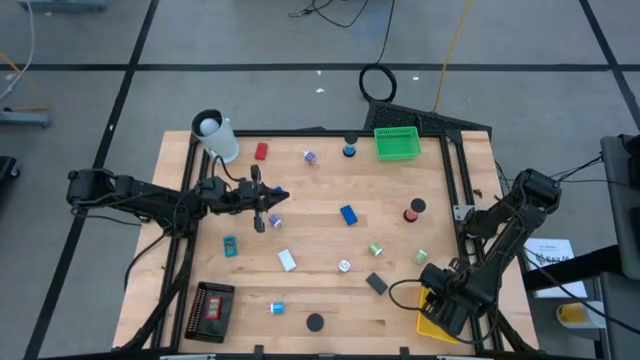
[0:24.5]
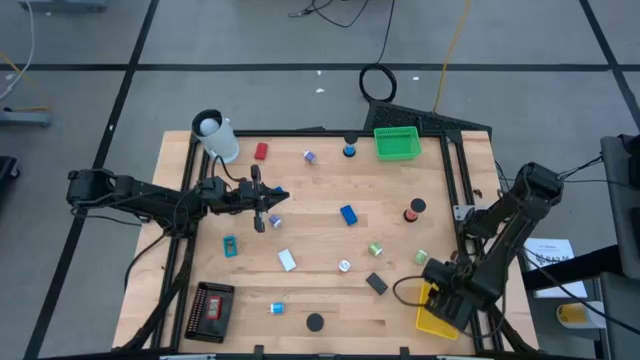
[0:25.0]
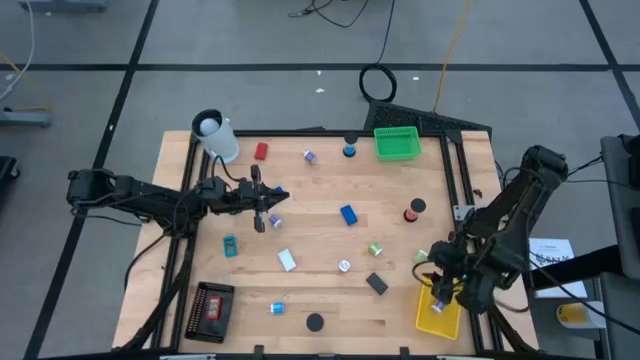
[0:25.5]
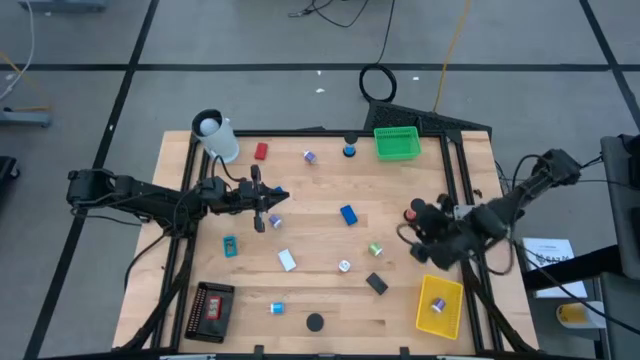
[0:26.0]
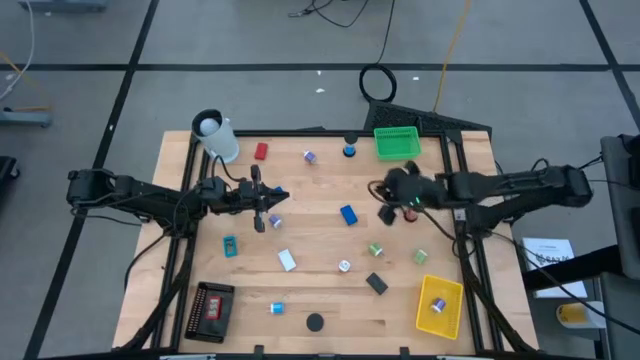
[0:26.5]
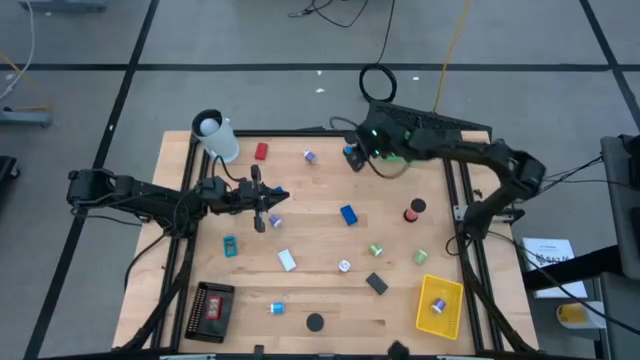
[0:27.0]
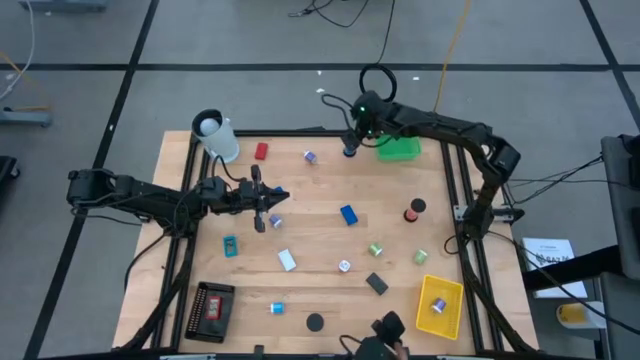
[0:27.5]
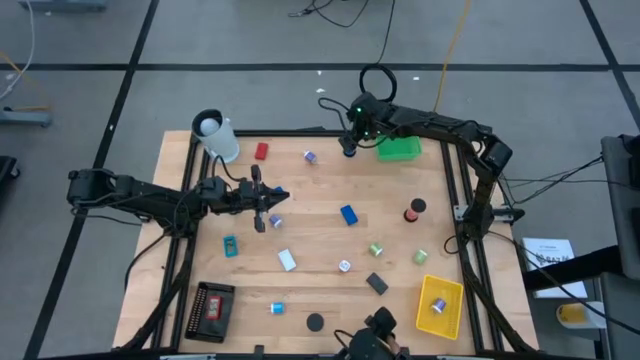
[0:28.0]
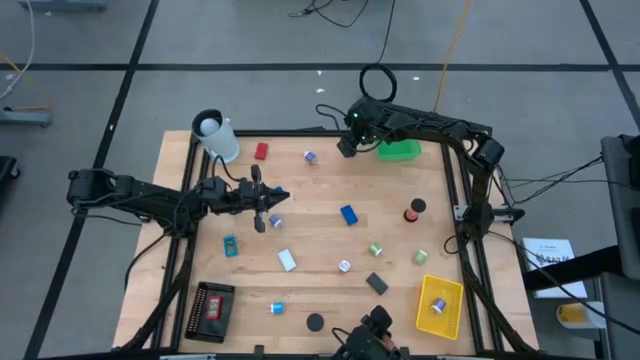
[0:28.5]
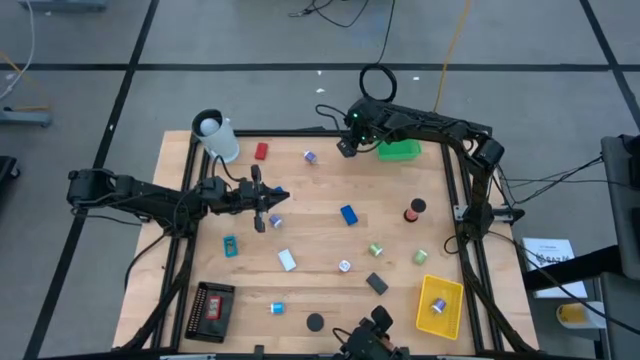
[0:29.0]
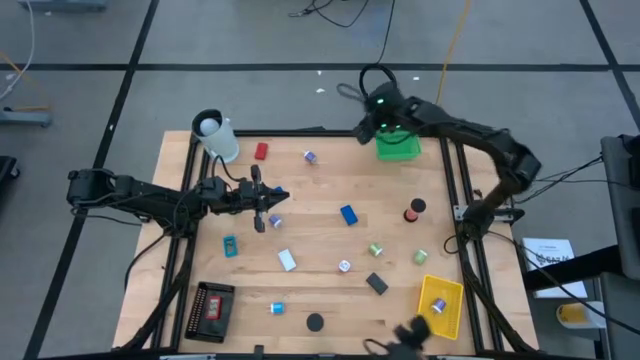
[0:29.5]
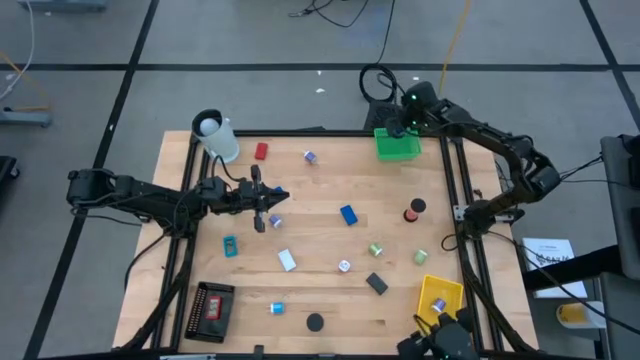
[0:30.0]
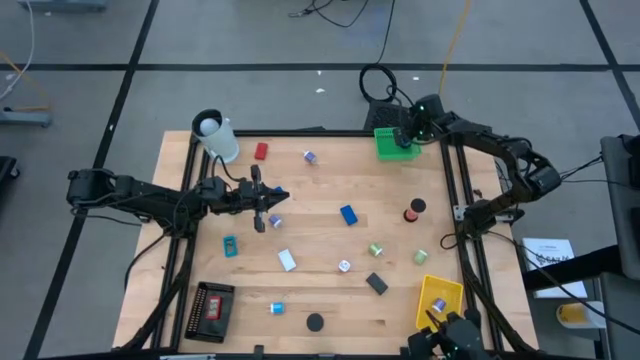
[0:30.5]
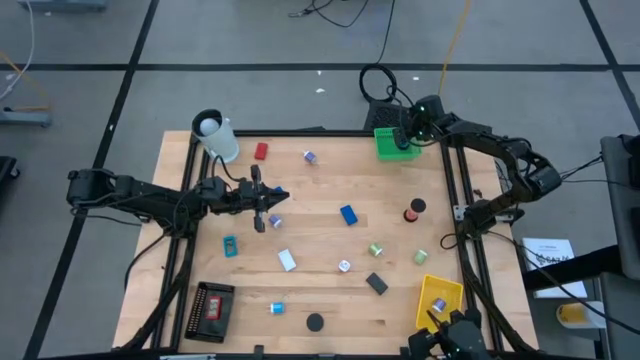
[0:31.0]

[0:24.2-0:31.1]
Task: Pick & Place Office items
Put the blue hourglass into the green bin

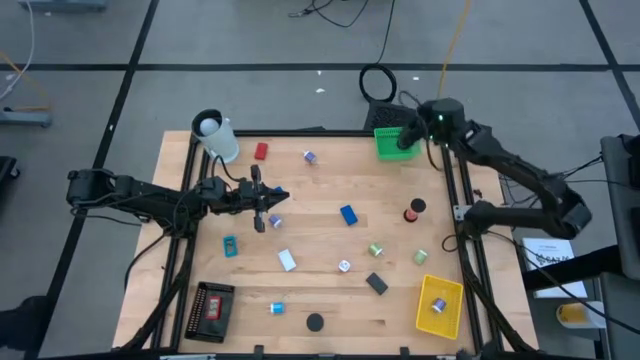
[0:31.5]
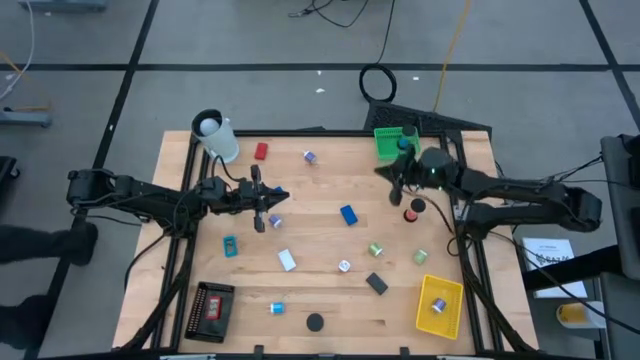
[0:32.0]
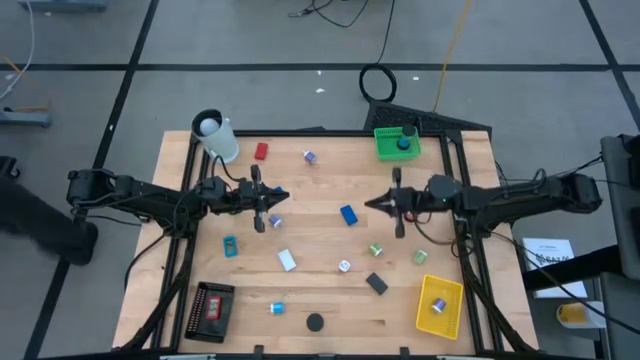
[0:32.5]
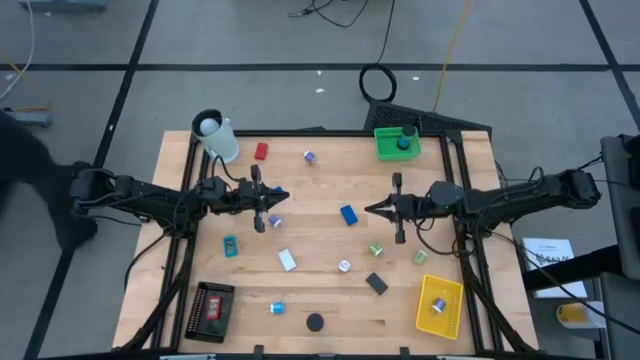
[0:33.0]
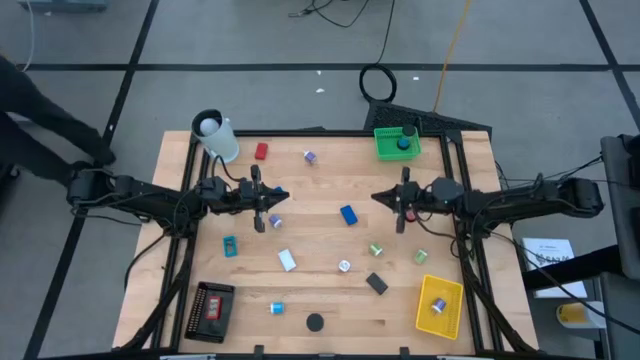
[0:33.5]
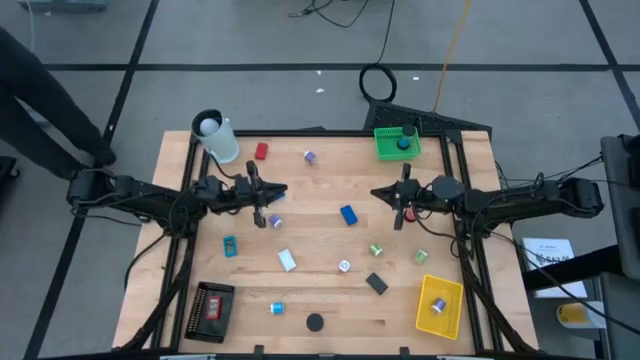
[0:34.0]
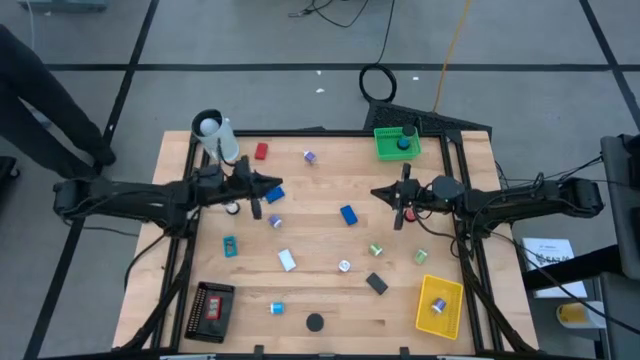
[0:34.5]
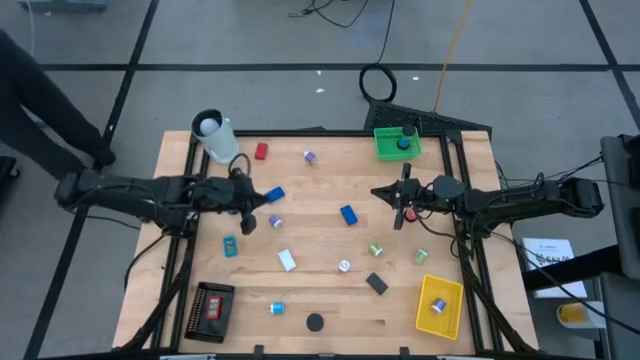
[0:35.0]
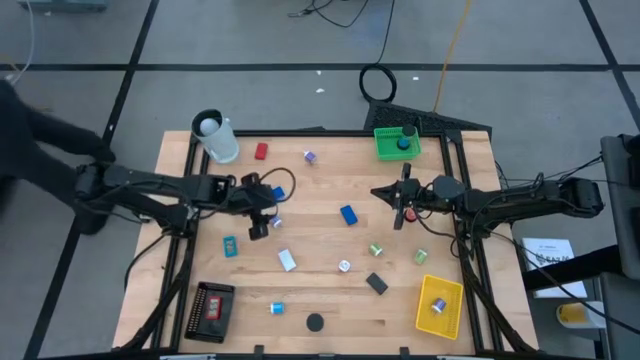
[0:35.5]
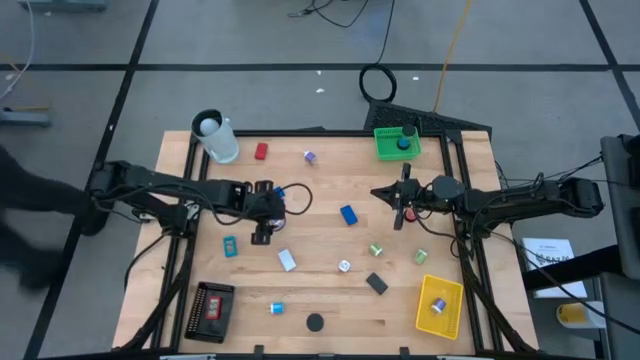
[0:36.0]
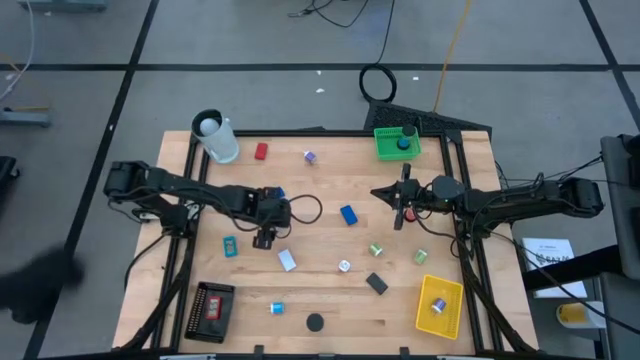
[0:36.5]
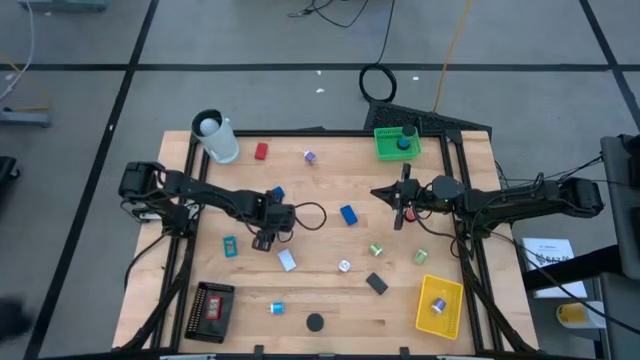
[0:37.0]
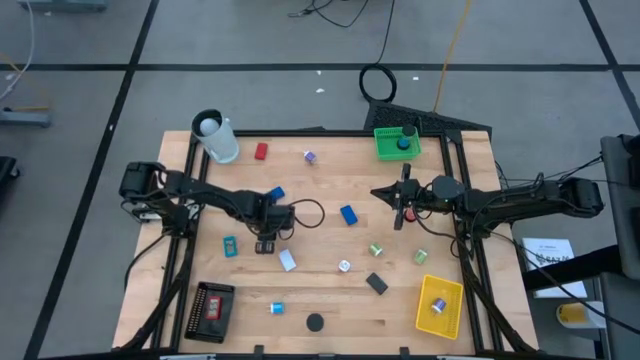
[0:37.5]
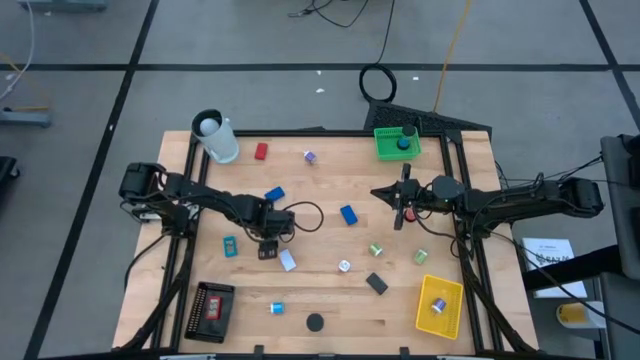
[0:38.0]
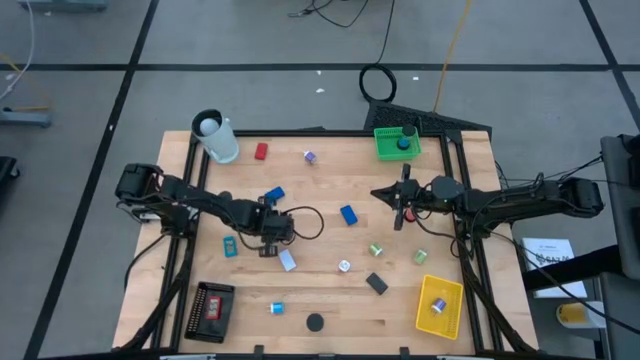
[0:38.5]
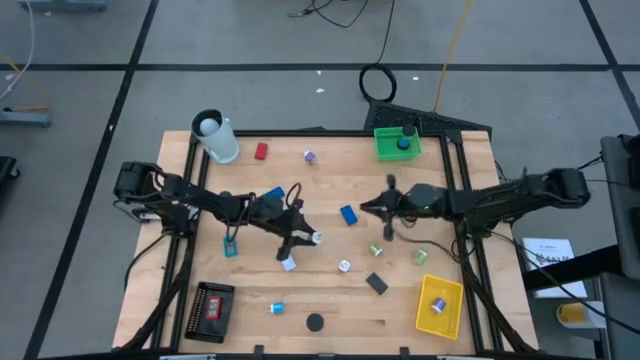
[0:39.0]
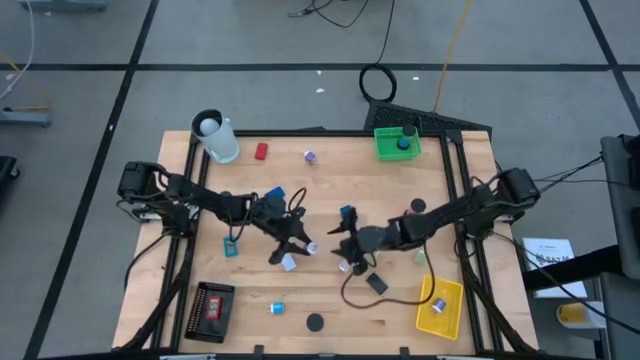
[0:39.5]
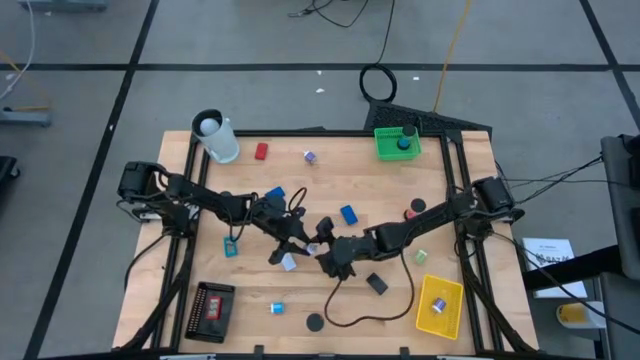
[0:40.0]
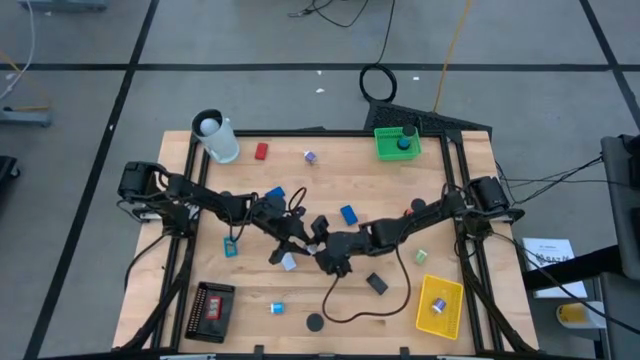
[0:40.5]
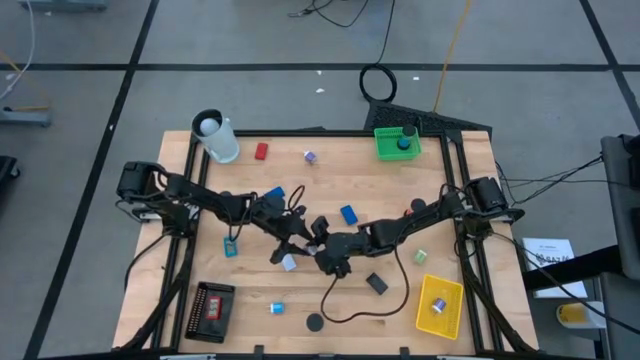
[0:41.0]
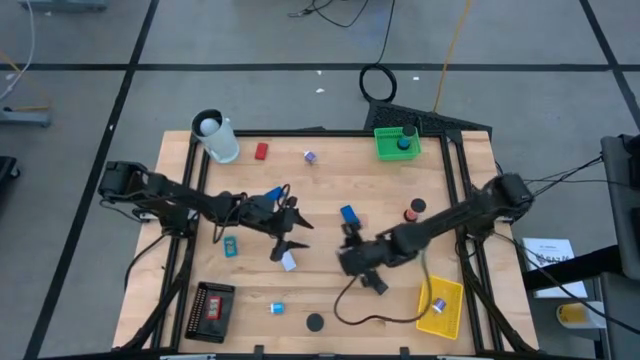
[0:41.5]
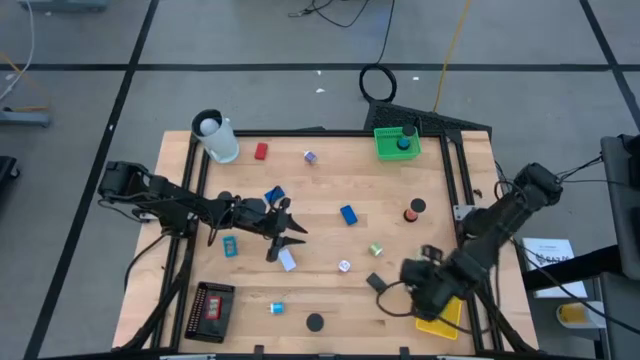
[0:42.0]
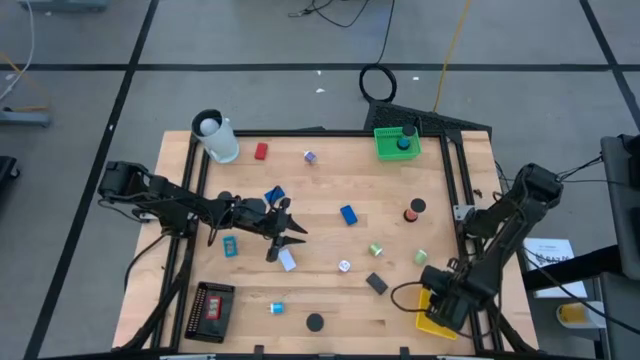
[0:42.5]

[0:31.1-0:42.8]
Put the bottom purple charger adapter into the yellow bin

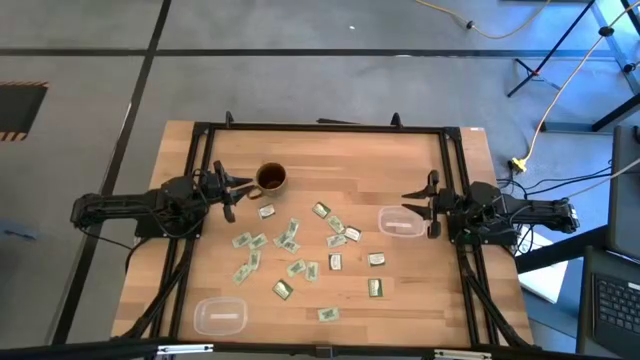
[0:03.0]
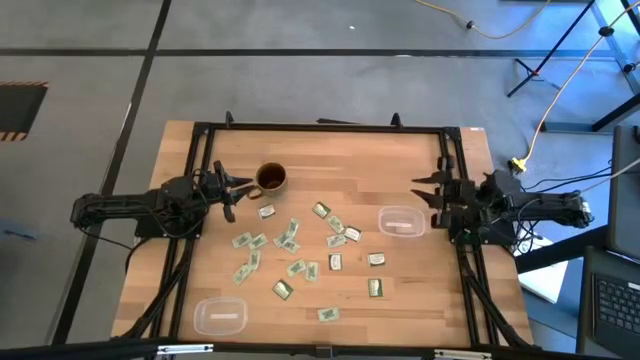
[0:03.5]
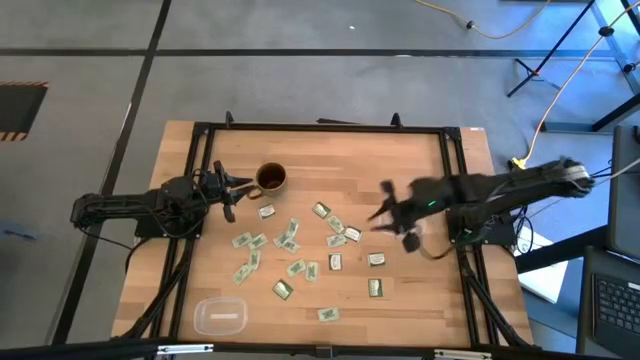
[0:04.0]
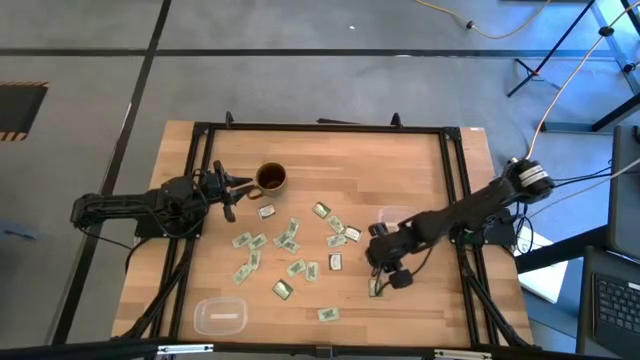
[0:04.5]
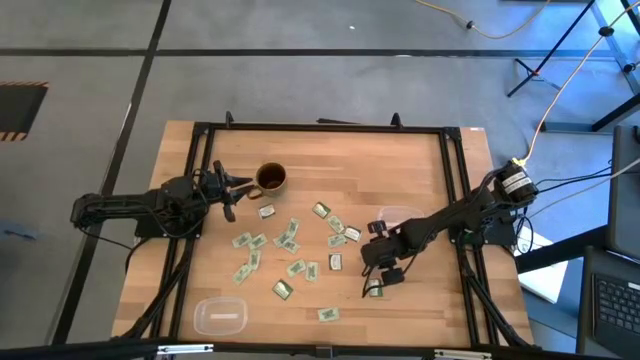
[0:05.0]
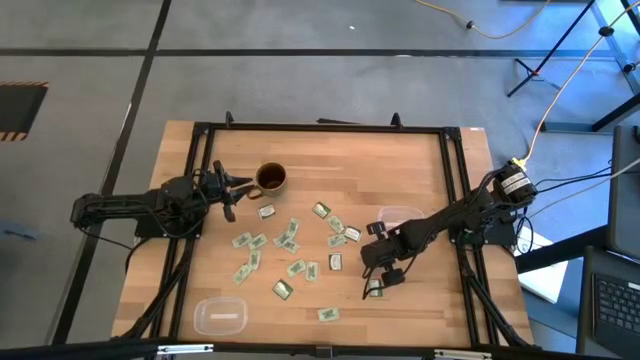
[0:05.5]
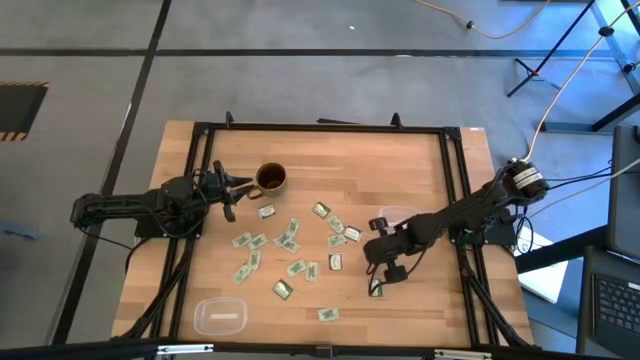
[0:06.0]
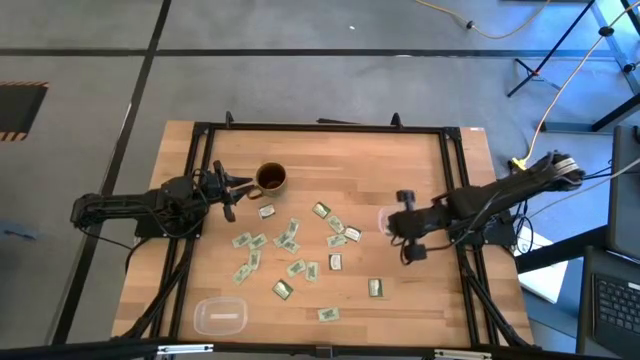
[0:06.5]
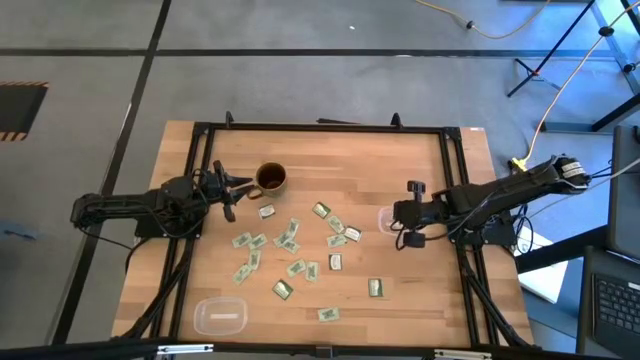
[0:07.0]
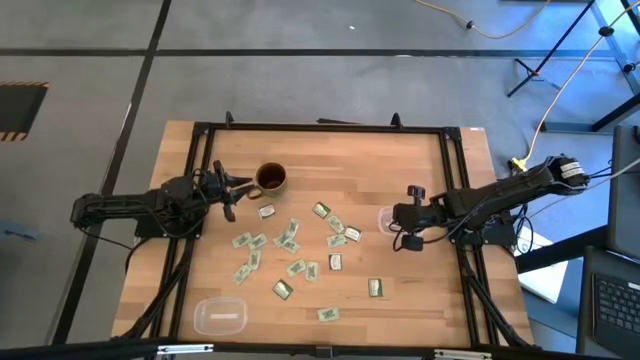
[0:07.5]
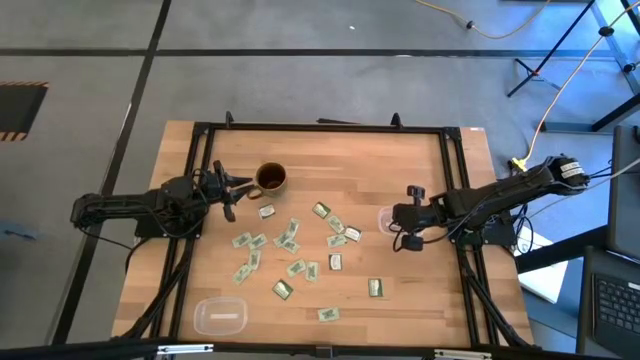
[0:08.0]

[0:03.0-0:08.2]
Task: Pick and place Stevia / Truvia into bins
Put the truvia packet into the top transparent container
